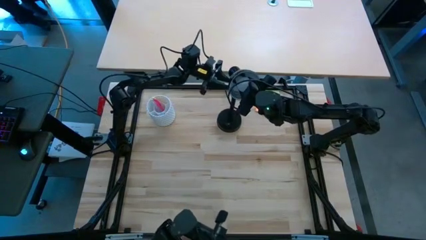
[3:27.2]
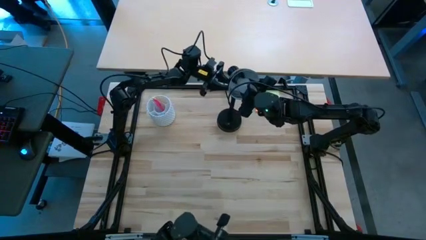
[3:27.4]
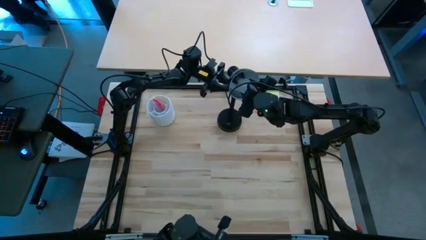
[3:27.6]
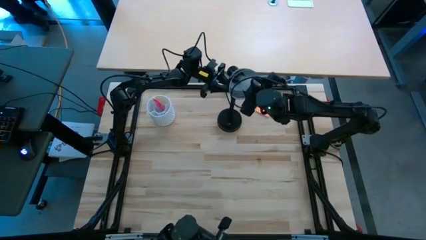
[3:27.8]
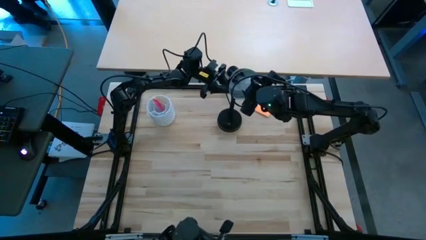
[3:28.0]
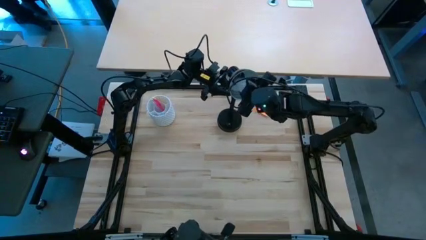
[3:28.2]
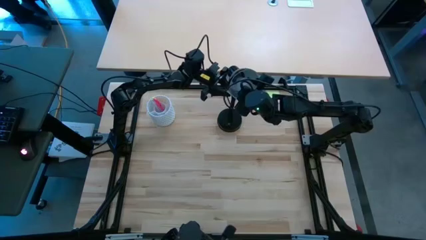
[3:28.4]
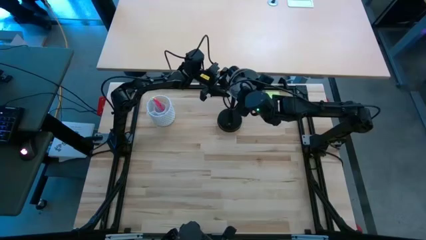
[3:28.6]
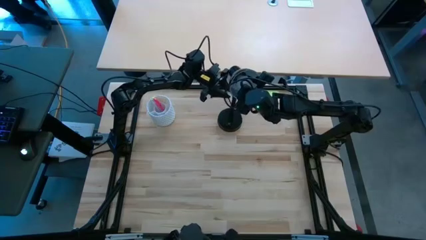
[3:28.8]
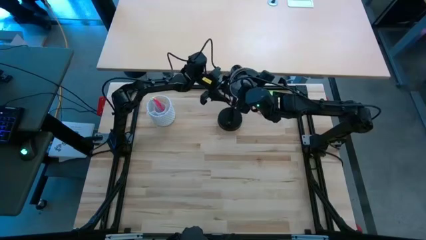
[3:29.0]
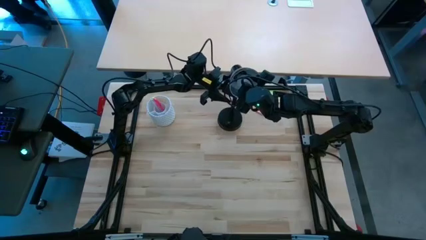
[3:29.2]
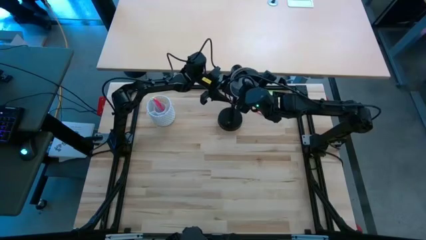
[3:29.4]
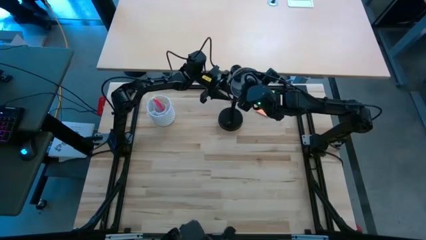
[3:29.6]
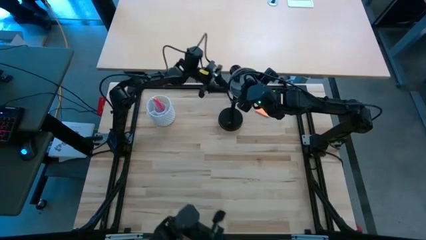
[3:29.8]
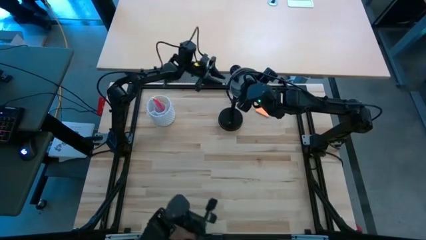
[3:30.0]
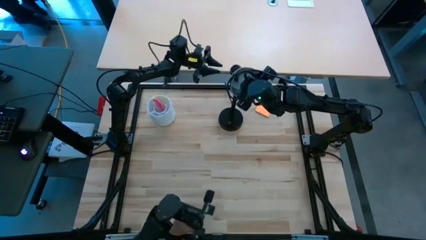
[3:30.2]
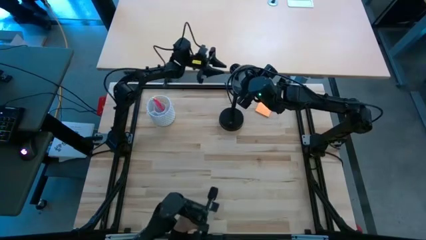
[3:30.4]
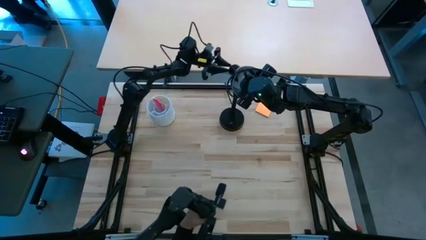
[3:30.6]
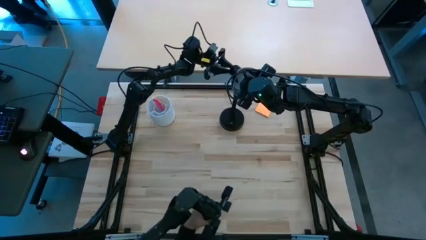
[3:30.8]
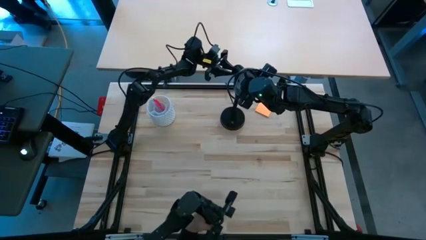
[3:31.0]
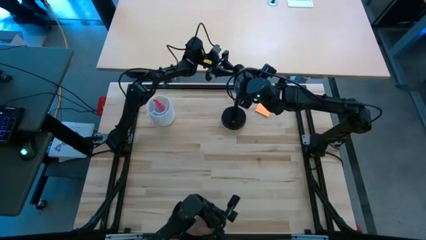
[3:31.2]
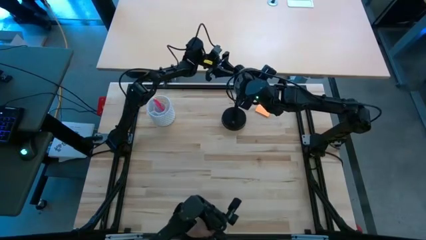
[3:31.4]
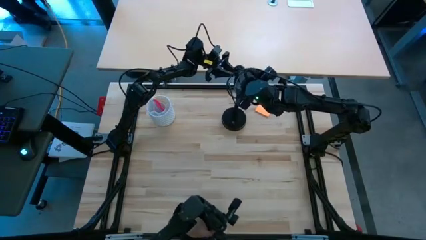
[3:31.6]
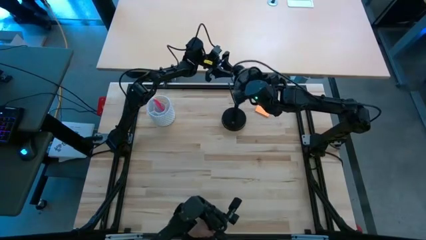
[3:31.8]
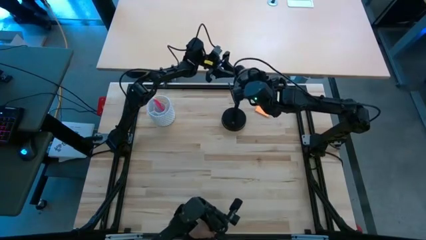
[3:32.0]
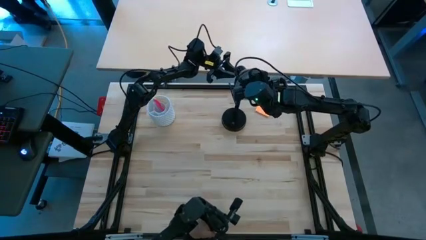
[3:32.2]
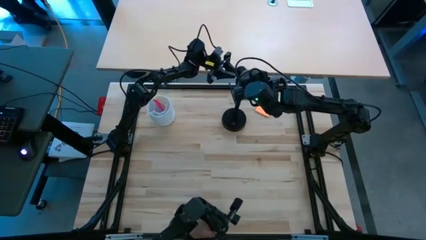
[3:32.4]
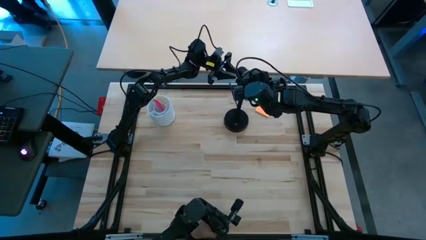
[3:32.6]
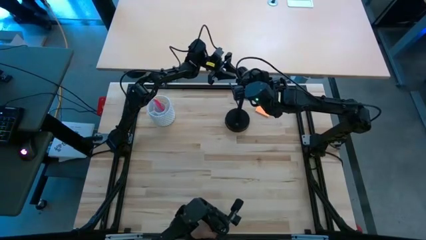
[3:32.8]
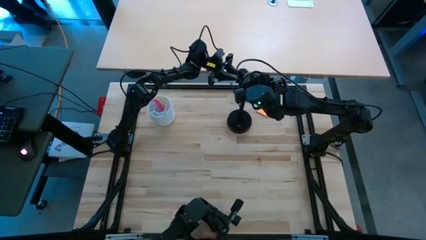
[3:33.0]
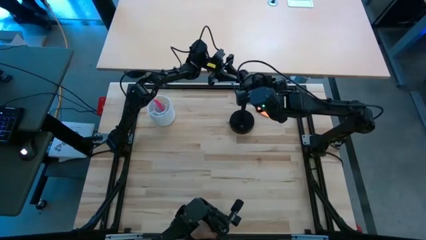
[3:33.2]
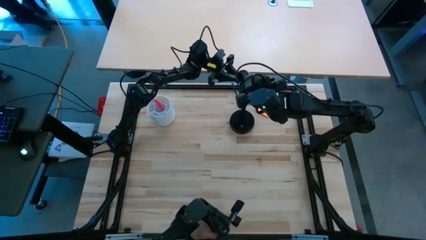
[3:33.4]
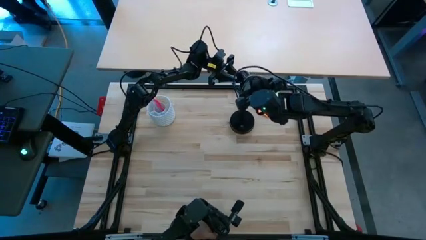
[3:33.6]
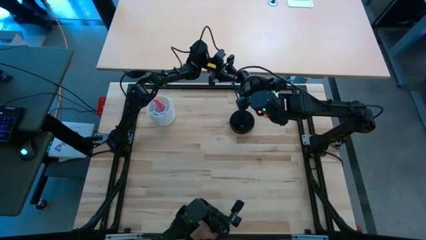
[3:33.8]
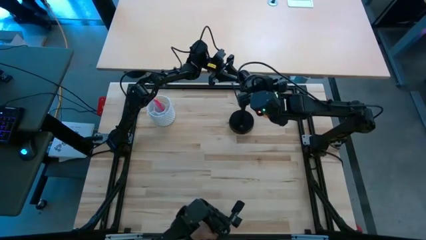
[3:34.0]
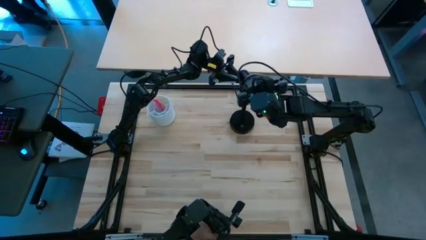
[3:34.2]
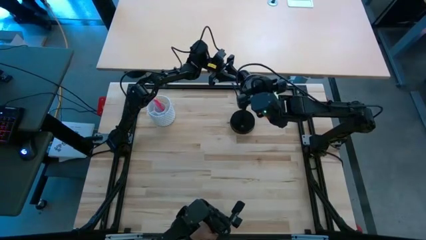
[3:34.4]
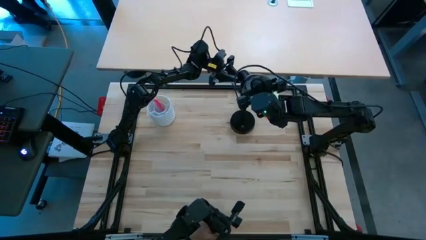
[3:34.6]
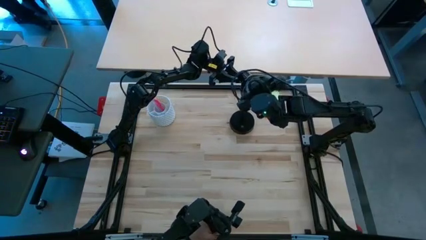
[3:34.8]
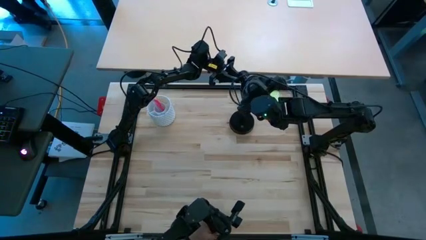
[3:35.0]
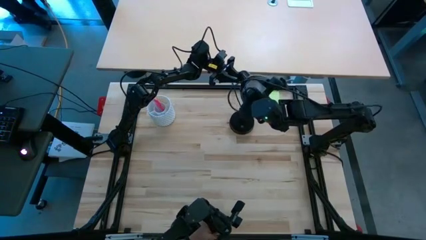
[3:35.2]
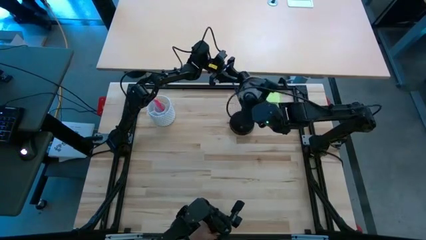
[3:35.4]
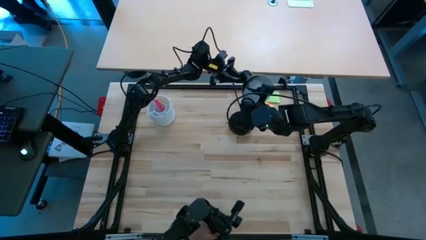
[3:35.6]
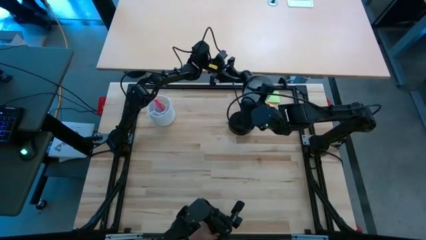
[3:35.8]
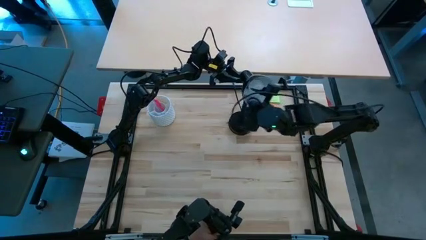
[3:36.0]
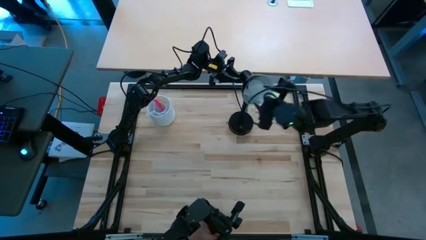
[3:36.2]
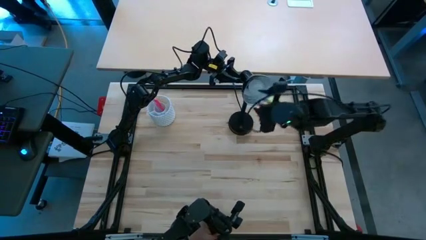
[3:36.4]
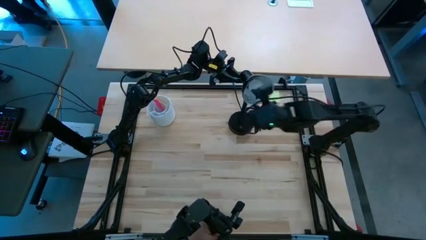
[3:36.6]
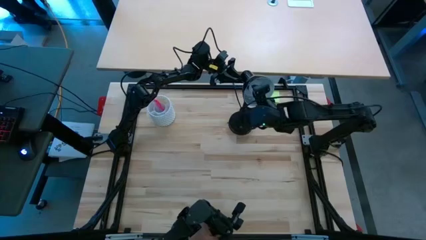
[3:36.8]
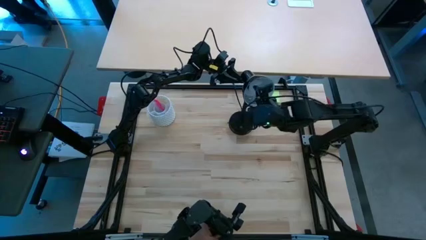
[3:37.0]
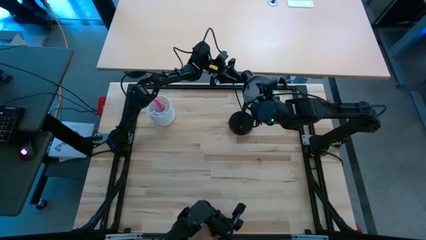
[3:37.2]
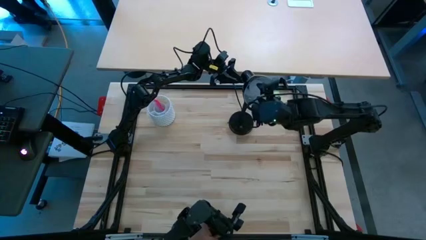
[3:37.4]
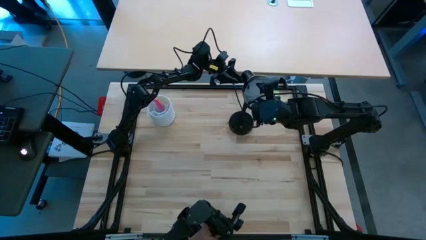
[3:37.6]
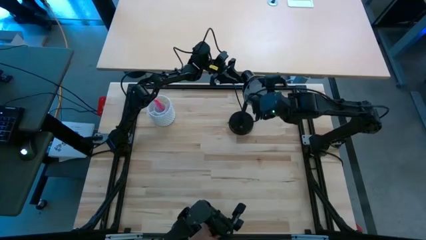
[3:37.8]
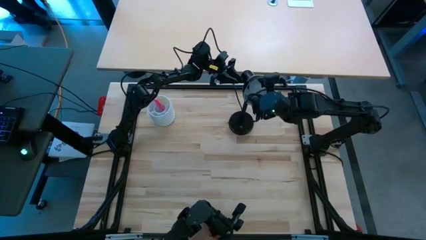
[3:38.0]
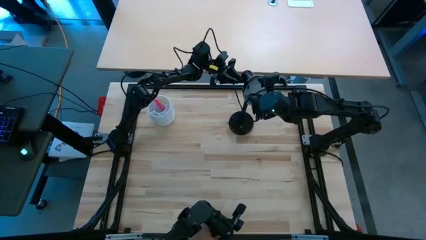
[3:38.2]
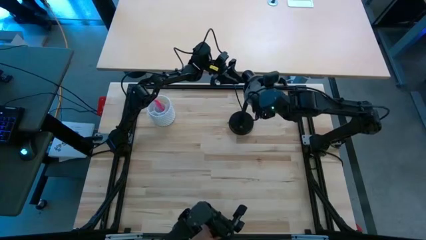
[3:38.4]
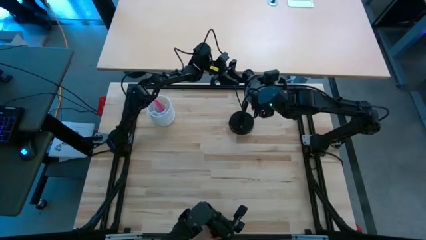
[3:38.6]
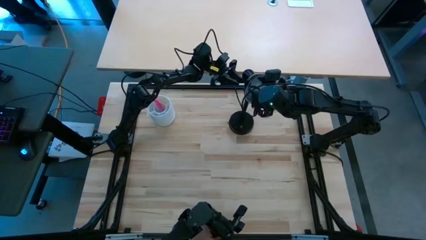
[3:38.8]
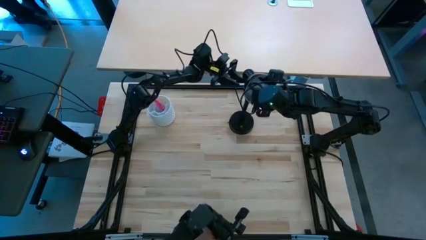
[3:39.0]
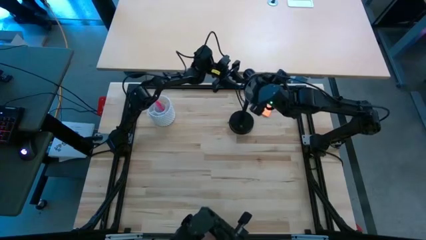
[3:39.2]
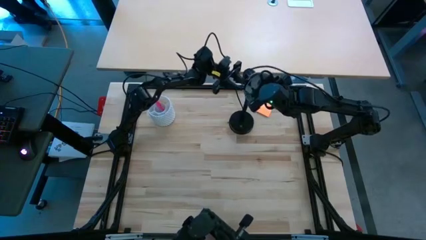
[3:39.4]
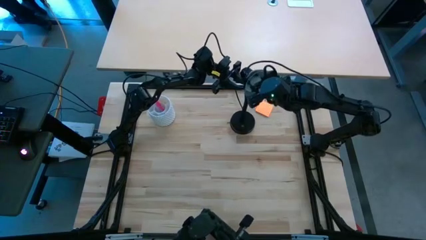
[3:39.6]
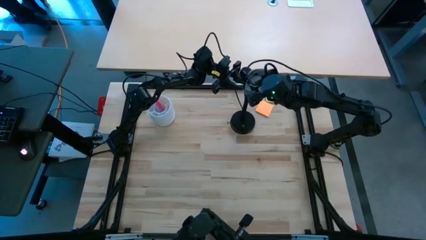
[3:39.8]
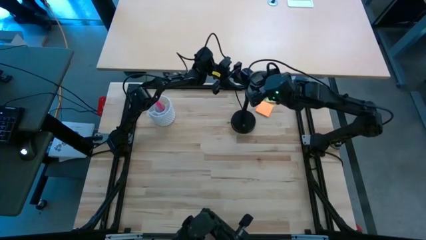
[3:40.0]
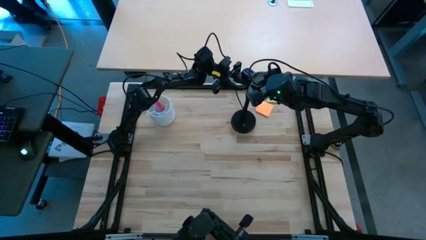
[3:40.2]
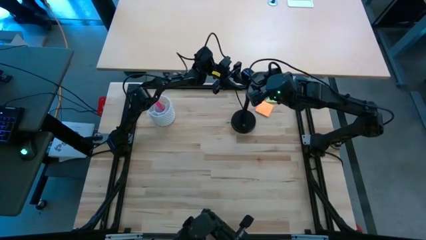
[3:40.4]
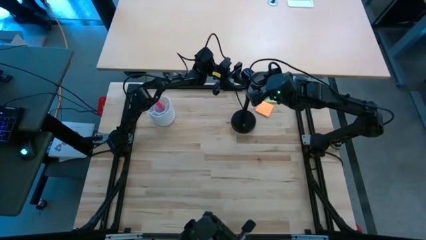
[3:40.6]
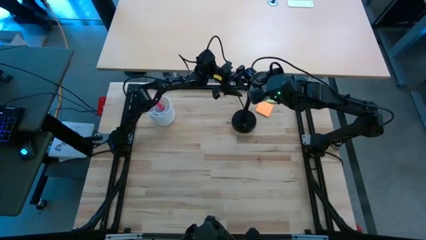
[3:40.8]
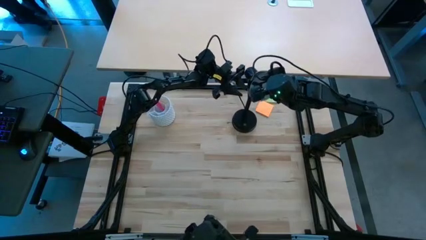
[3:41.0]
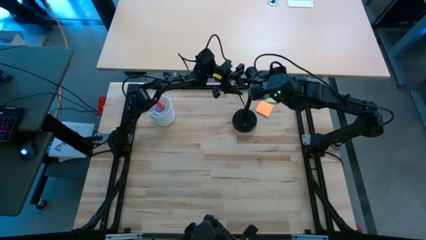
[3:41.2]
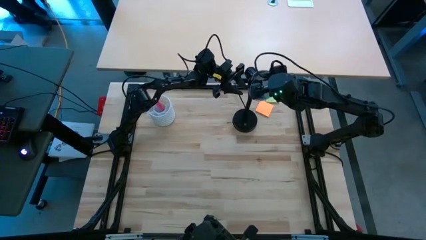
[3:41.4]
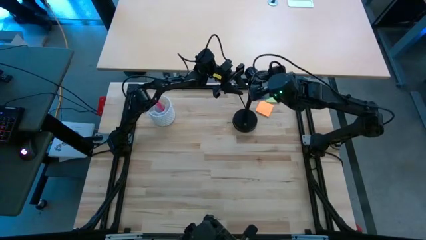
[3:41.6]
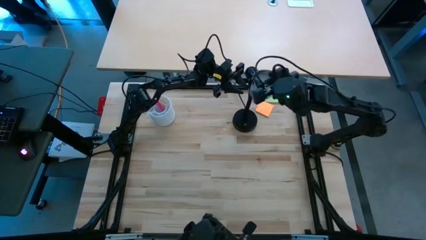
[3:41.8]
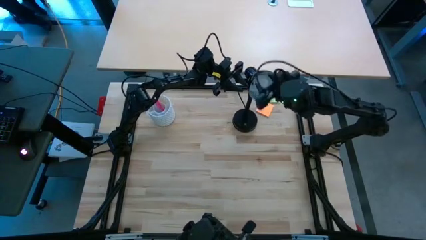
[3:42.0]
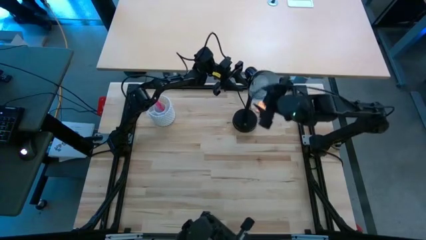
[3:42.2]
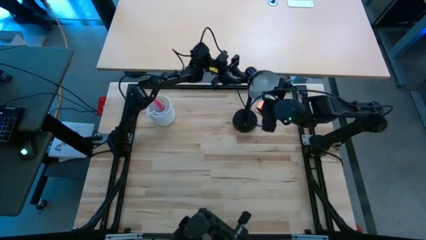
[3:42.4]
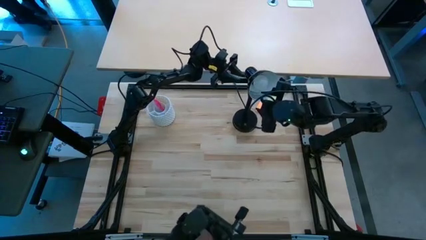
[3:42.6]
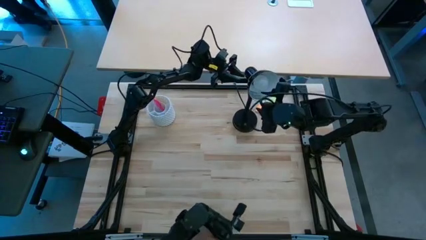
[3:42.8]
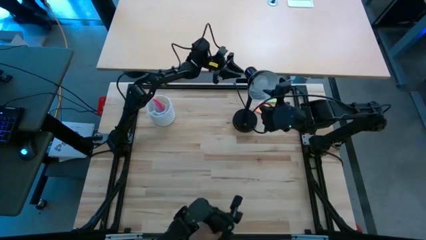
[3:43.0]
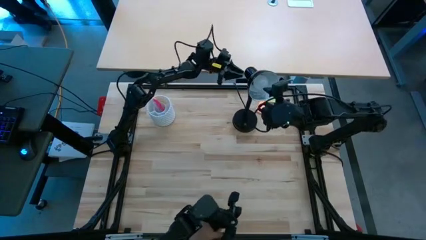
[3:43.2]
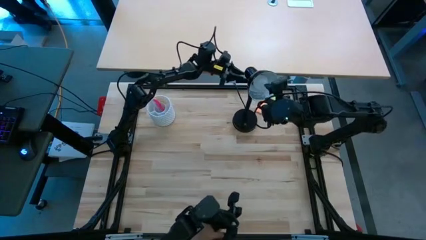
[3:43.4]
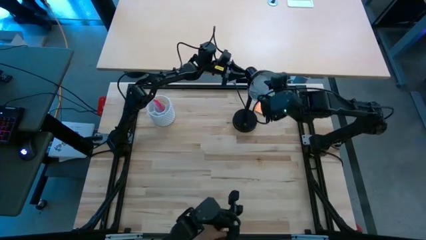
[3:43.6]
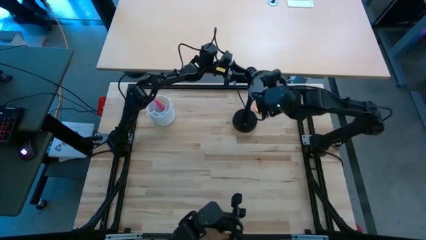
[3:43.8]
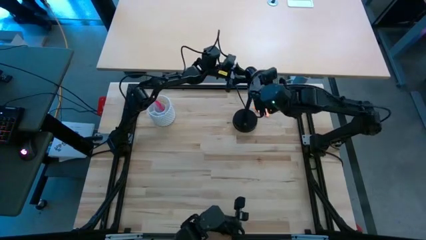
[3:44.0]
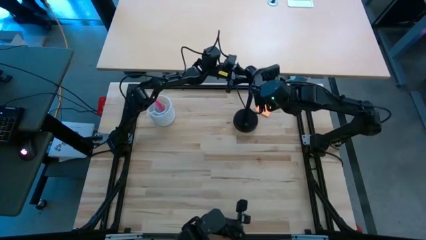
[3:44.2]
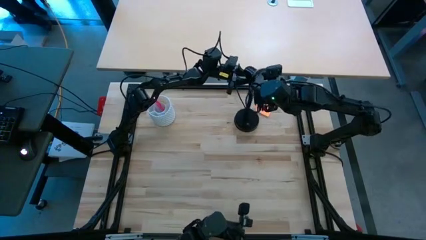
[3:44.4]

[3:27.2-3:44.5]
Task: Screw lightbulb
Insert the light bulb into the desk lamp
